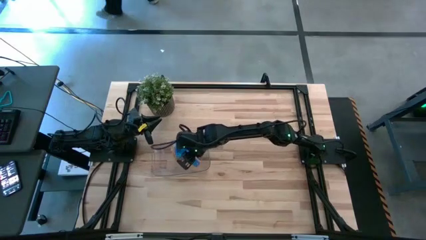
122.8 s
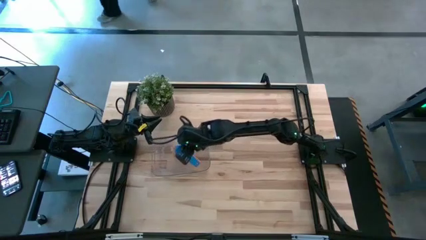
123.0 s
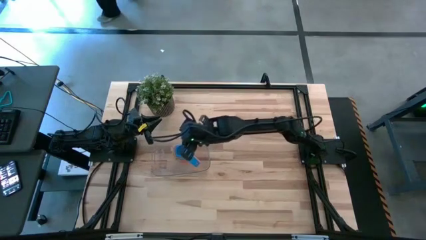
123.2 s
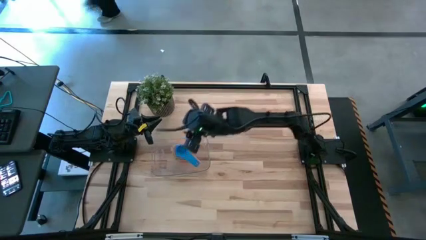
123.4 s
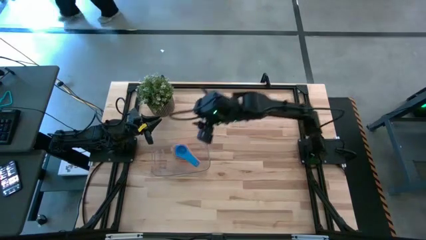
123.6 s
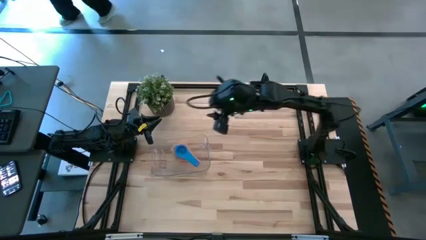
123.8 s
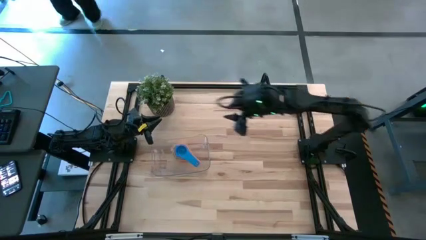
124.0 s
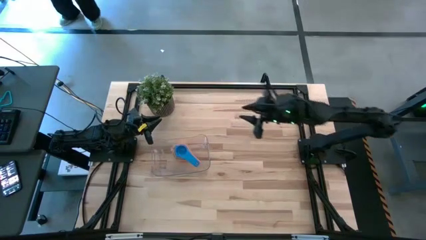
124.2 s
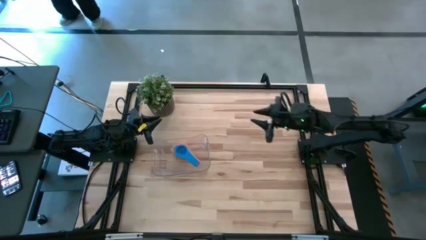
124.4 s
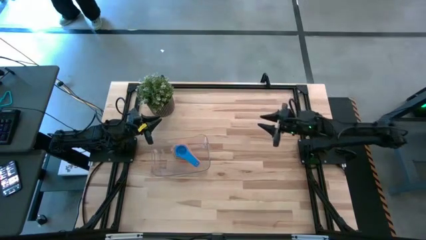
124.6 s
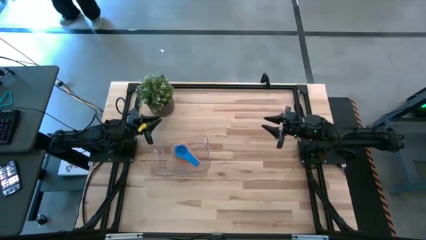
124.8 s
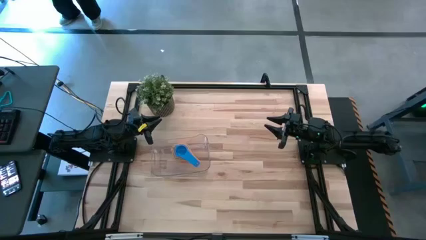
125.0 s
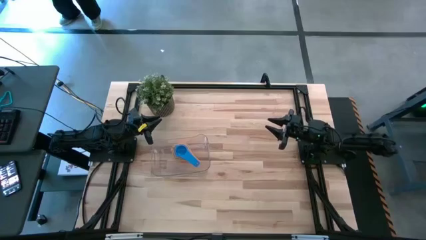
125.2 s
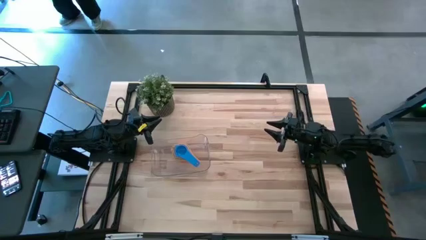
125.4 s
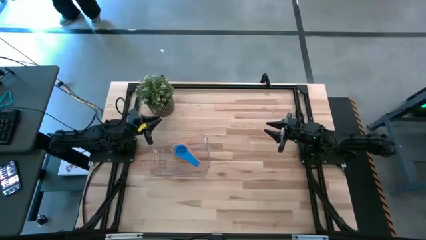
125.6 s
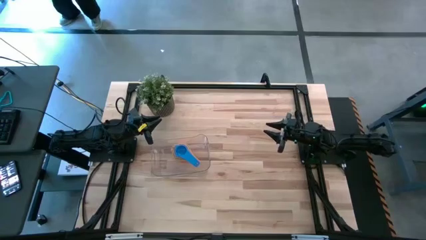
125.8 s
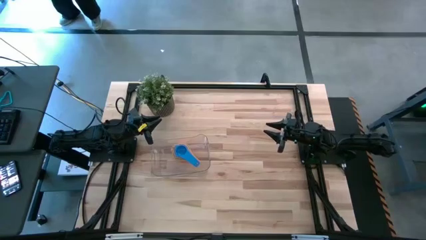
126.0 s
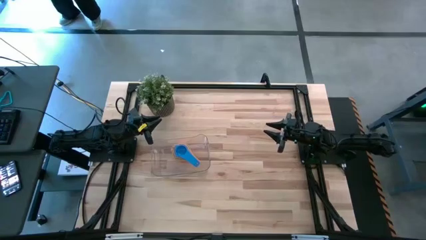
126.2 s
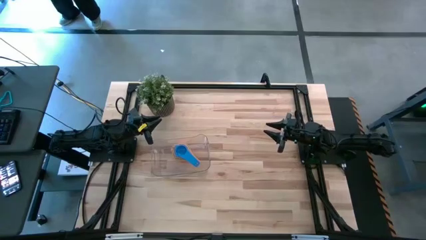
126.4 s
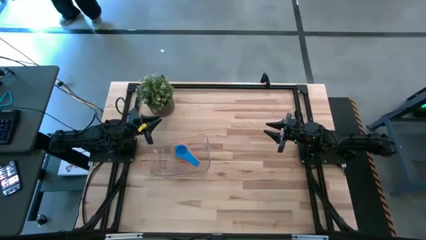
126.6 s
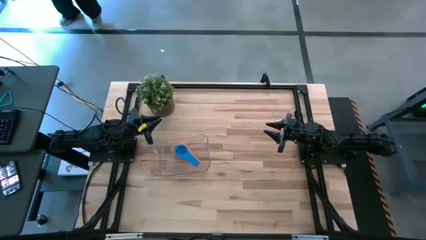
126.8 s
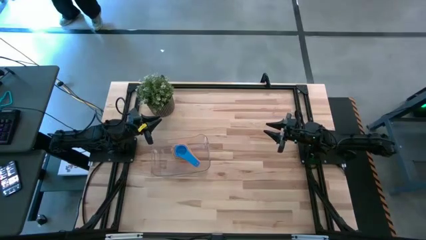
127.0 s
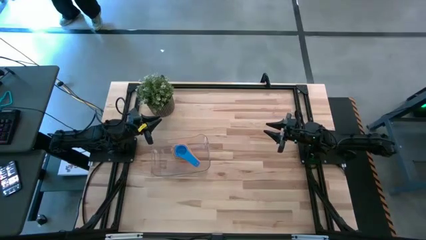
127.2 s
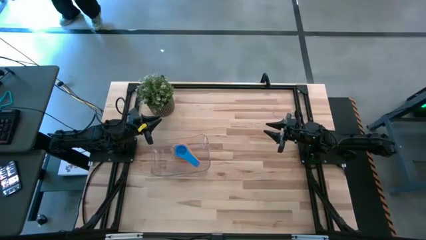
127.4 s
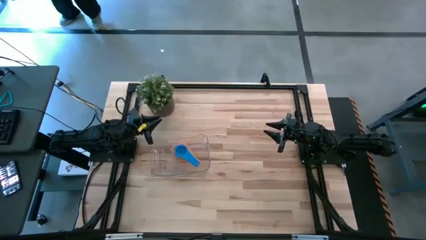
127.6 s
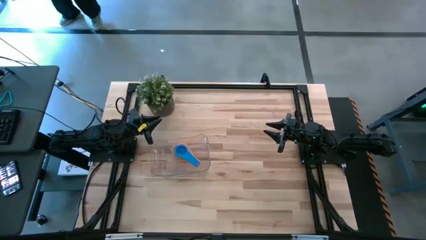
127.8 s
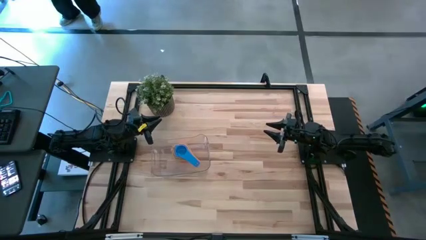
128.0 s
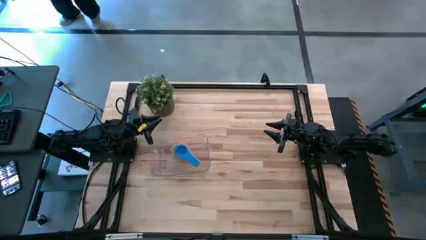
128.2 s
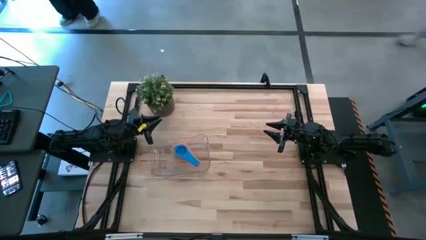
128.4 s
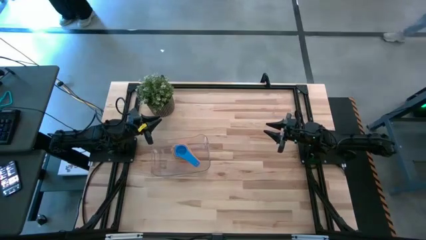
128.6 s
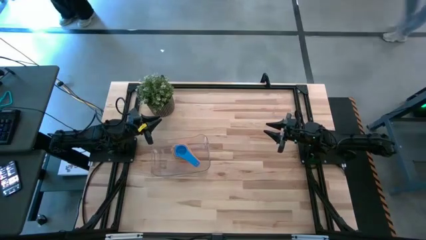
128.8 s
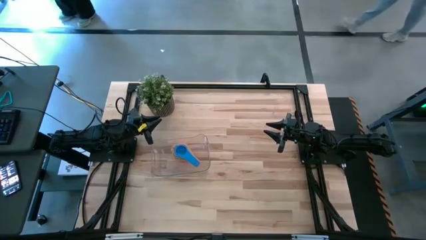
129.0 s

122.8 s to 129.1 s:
Task: Nest measuring cups in basket
Return to Home Position

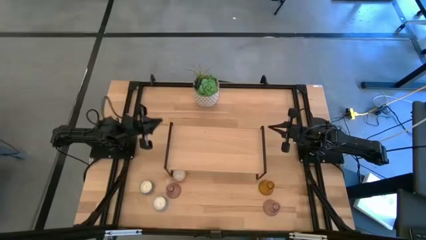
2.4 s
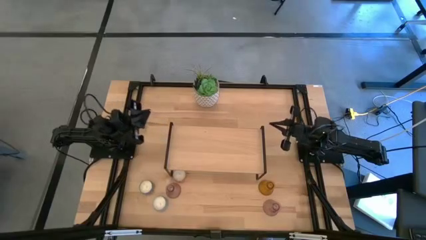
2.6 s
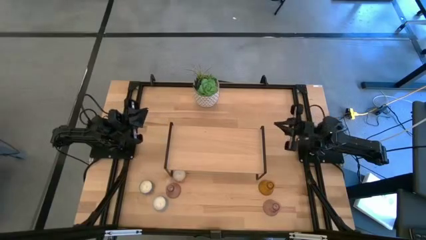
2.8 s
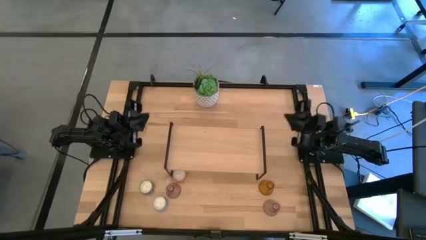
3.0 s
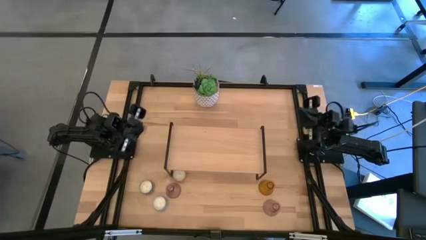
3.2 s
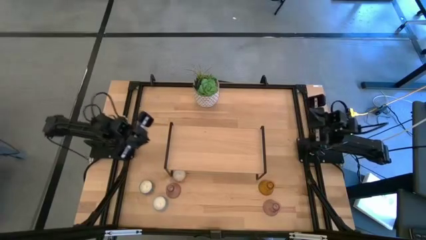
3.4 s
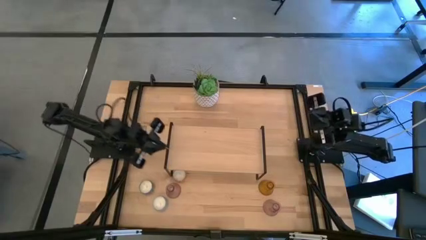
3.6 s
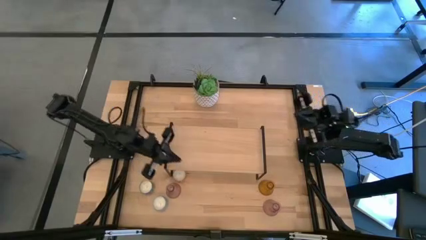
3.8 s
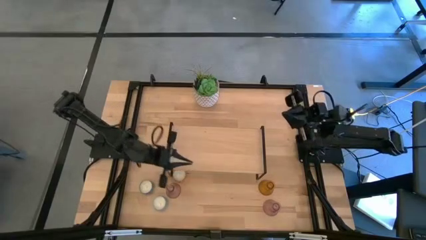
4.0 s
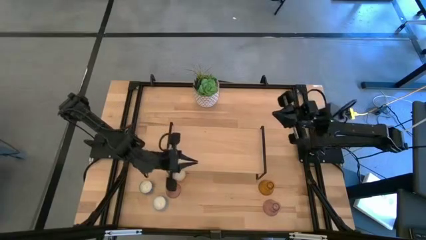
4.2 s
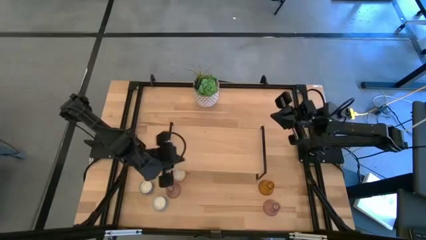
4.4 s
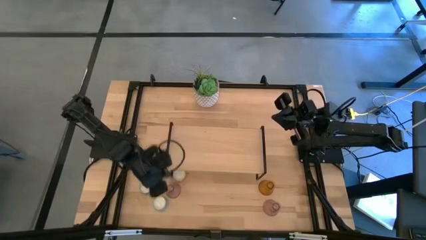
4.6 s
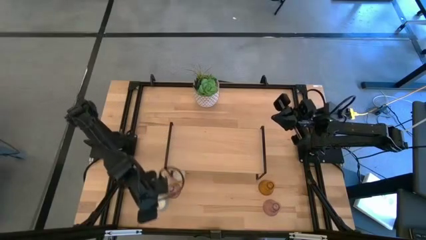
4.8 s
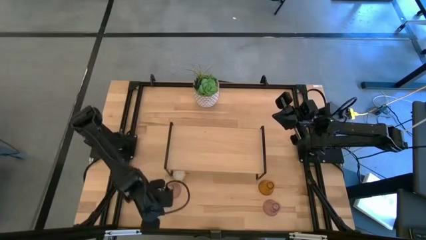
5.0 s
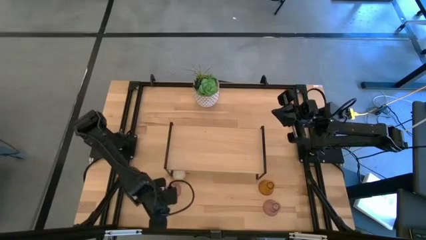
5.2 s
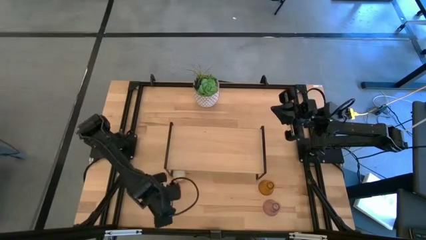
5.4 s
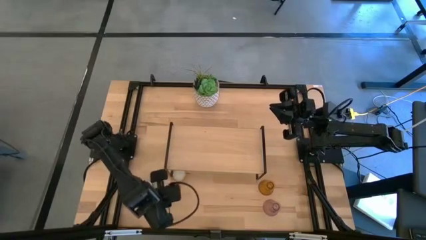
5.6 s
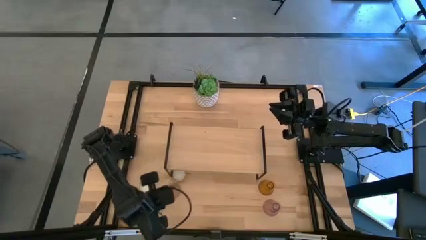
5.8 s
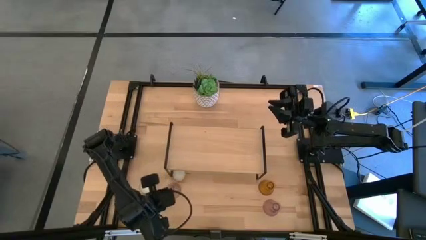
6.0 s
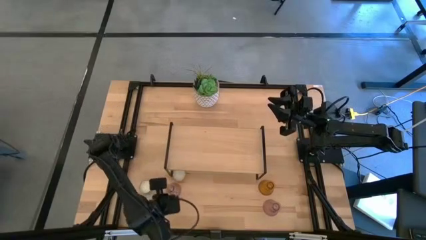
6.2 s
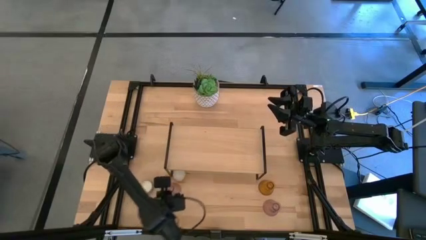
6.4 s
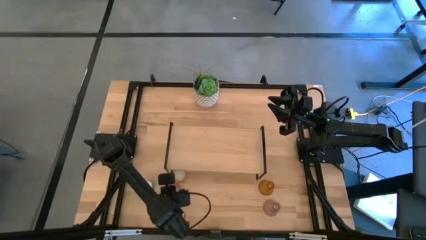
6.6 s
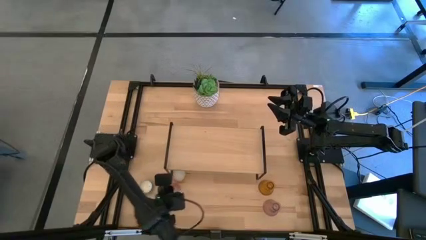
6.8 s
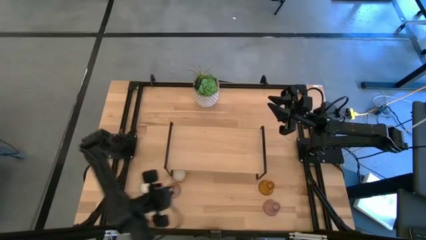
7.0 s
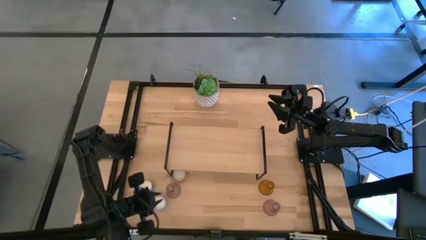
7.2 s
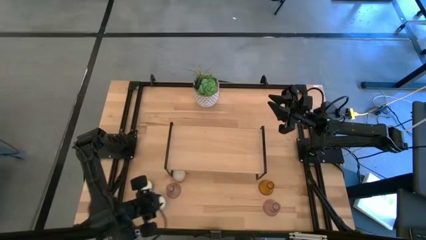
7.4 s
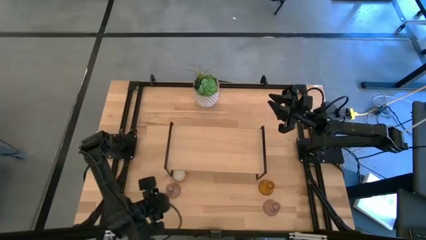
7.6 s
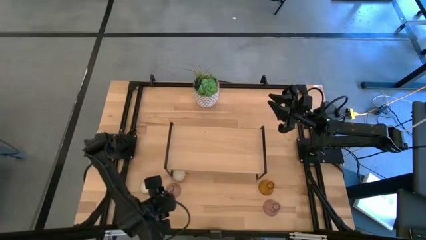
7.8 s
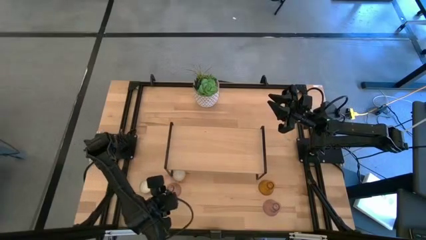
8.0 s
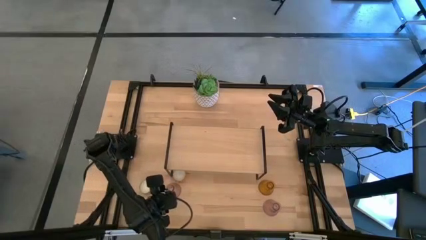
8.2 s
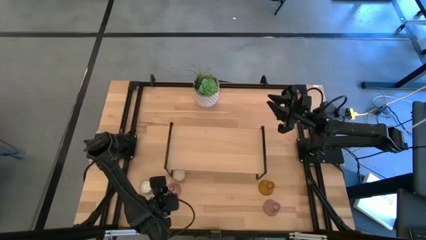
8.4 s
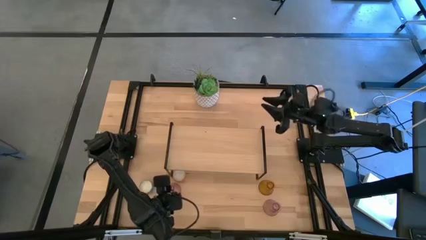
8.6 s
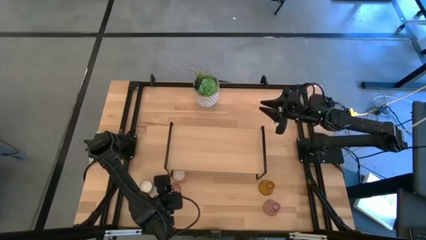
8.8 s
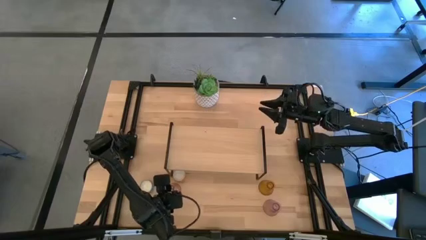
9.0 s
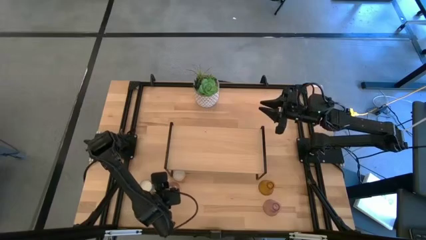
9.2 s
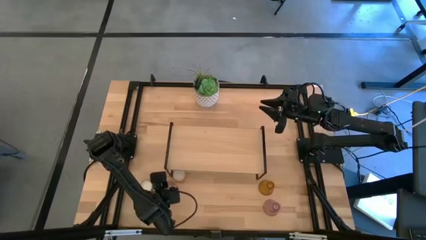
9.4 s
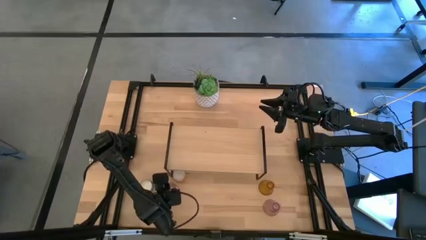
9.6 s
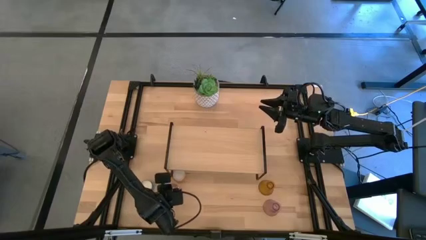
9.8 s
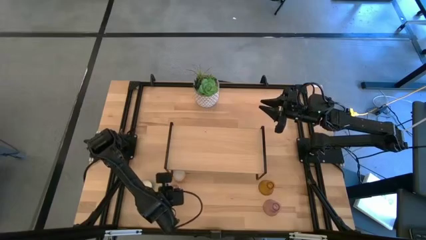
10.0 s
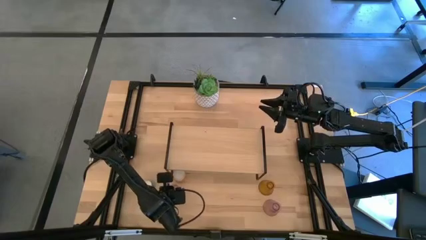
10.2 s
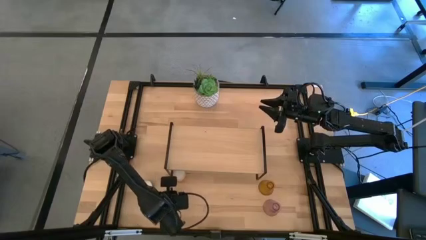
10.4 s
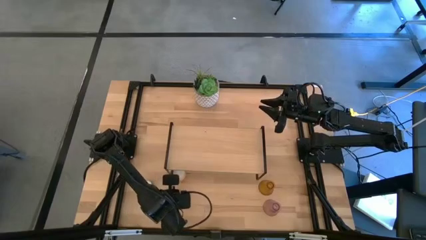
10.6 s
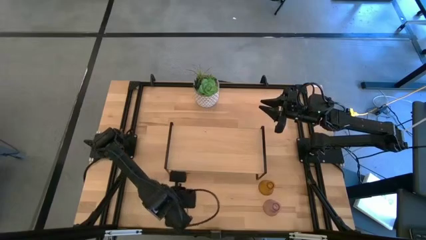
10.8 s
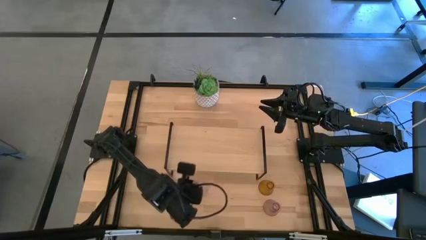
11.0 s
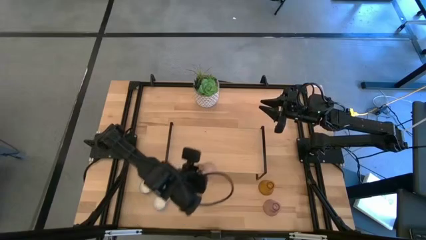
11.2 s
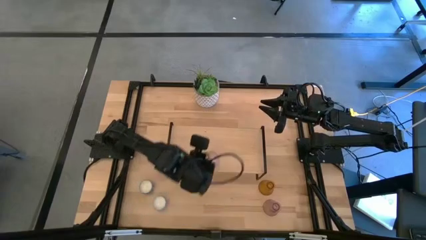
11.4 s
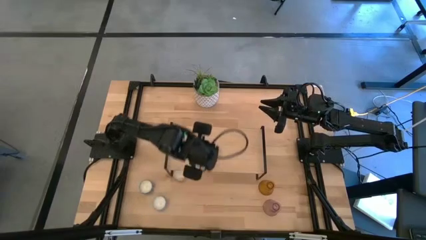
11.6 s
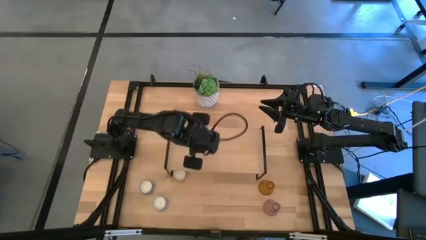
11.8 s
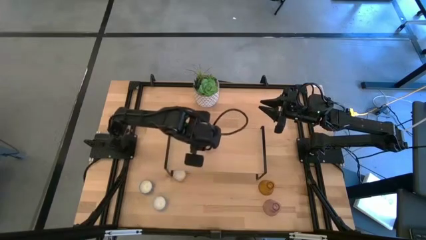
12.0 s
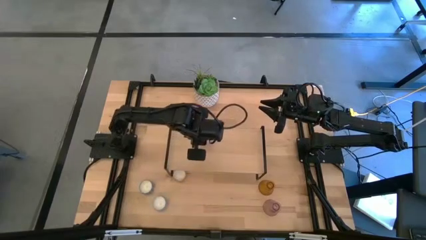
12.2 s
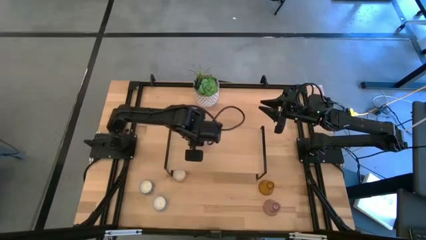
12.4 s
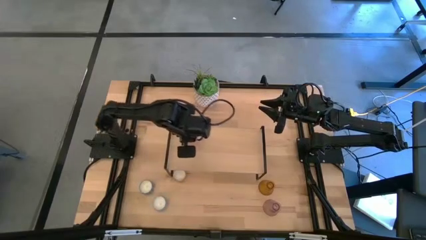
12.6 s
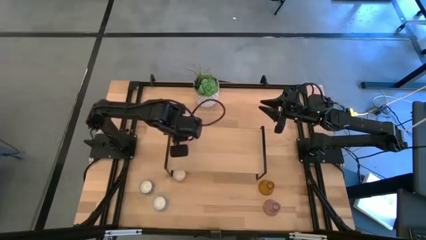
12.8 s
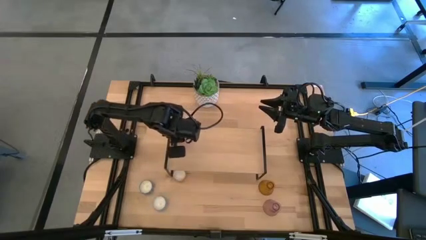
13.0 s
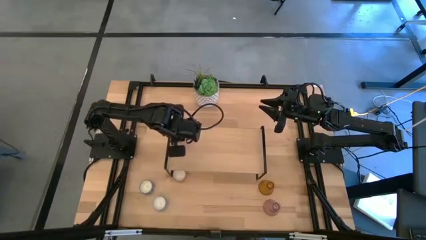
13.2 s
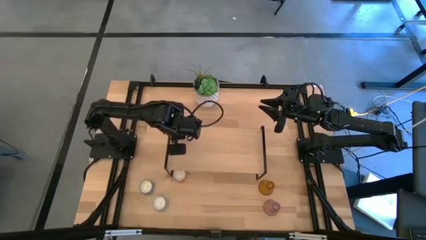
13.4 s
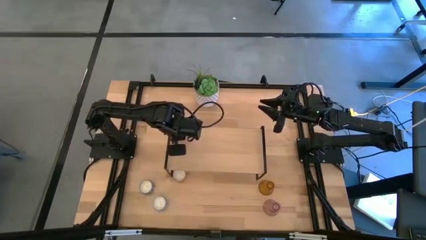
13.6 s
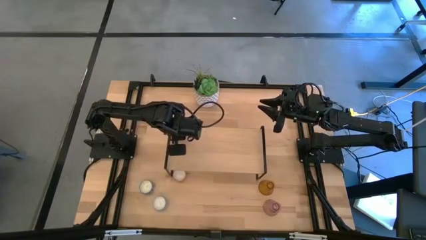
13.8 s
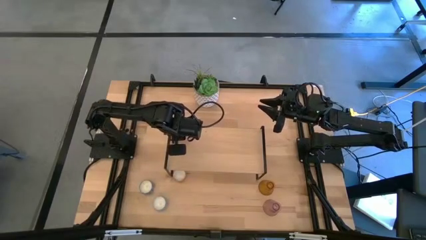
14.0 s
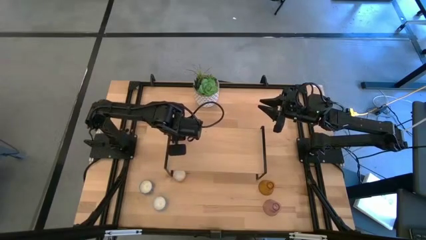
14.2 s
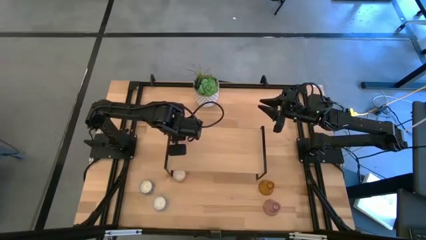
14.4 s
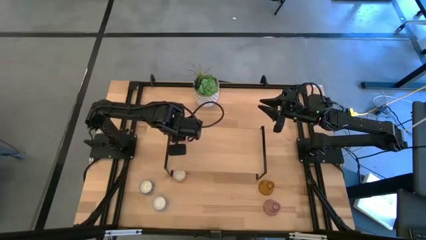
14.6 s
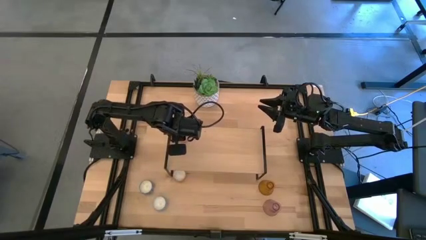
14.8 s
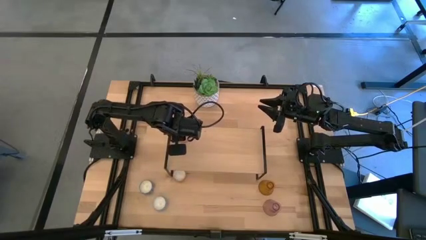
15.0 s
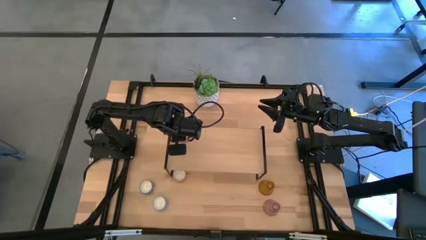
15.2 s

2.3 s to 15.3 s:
Task: Pick & Place candle stick holders
Put the left pink glass candle holder on the shelf
